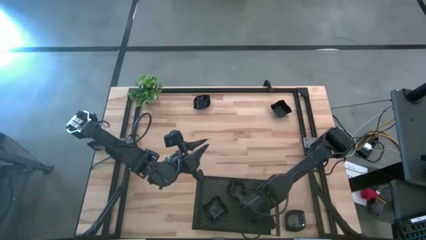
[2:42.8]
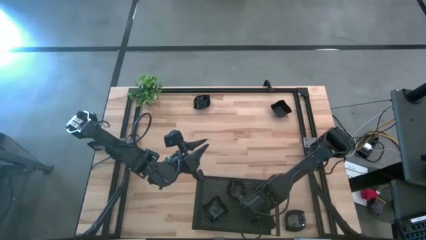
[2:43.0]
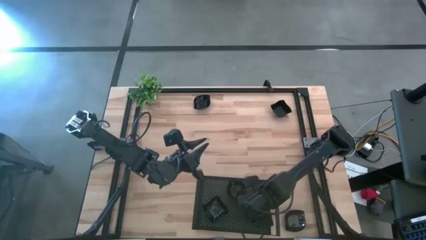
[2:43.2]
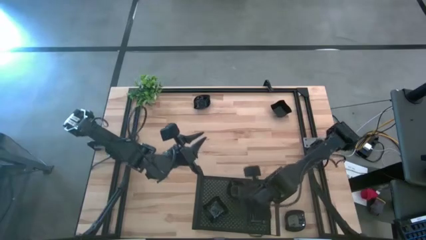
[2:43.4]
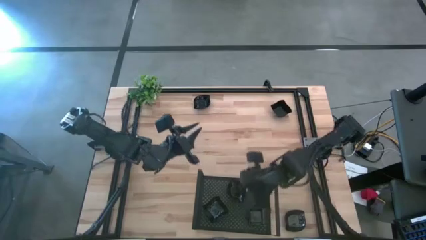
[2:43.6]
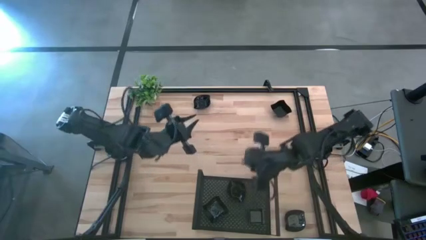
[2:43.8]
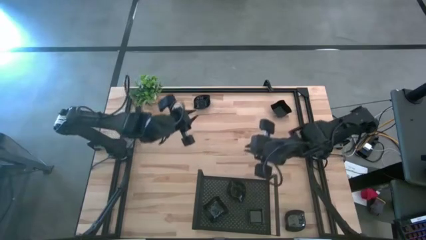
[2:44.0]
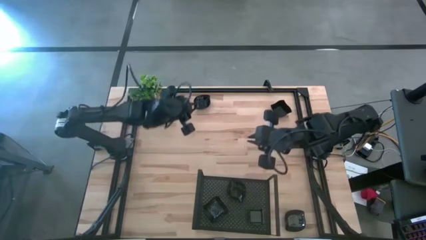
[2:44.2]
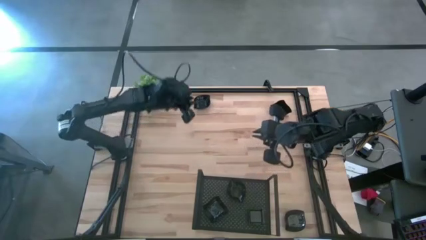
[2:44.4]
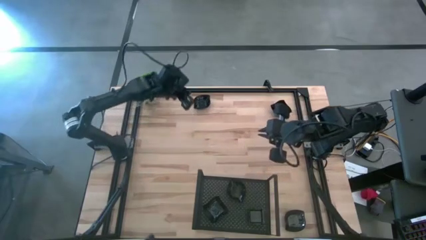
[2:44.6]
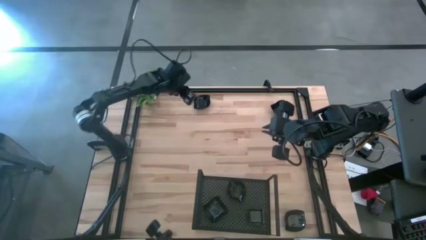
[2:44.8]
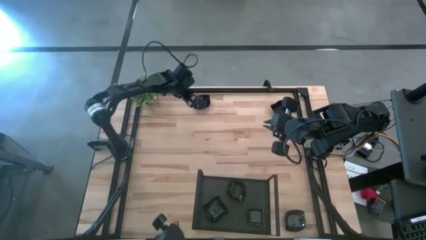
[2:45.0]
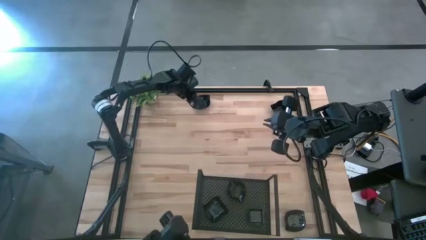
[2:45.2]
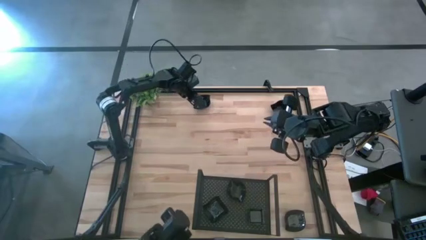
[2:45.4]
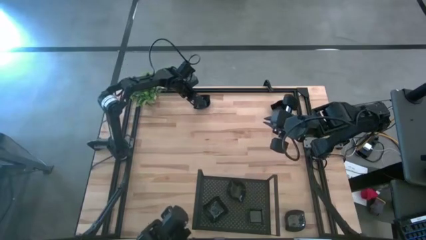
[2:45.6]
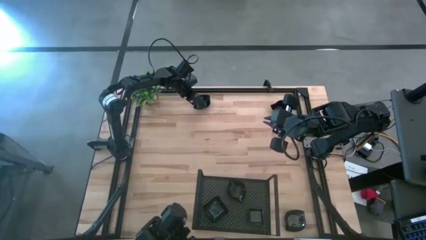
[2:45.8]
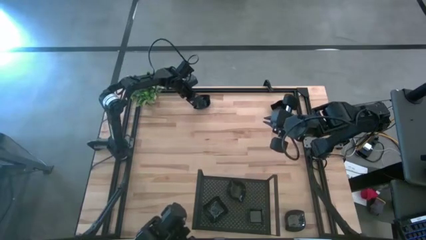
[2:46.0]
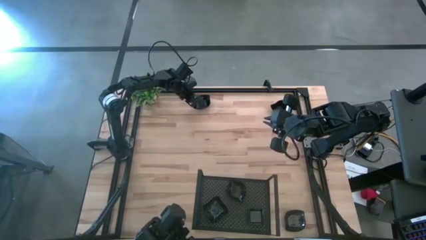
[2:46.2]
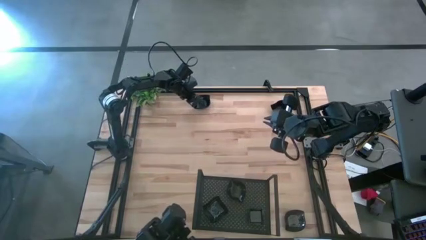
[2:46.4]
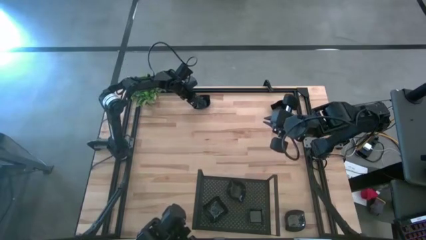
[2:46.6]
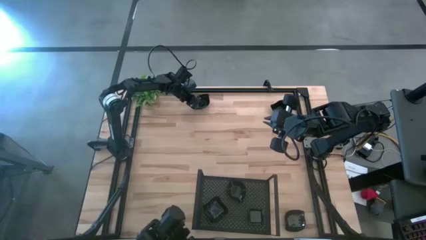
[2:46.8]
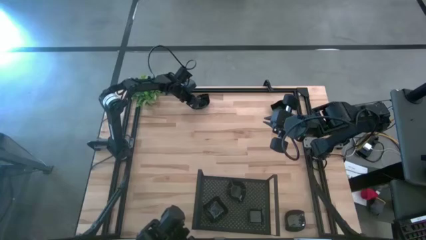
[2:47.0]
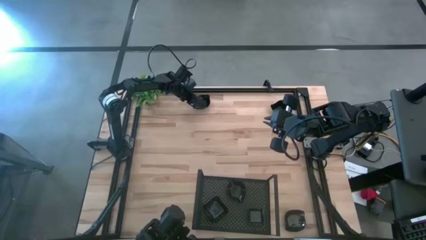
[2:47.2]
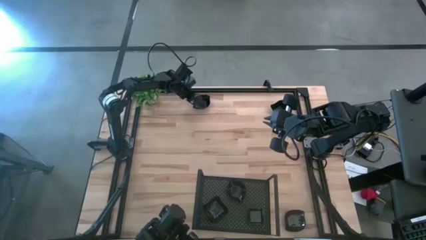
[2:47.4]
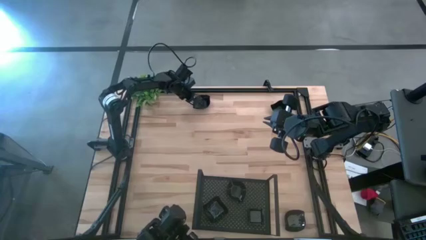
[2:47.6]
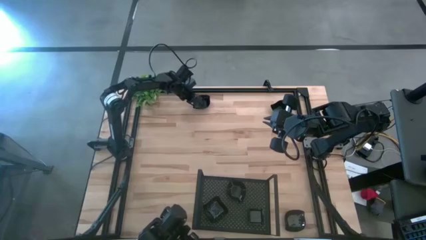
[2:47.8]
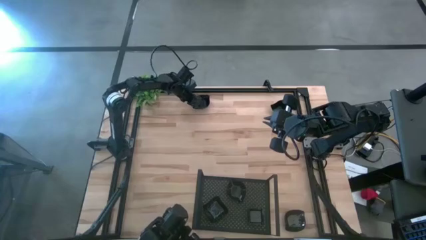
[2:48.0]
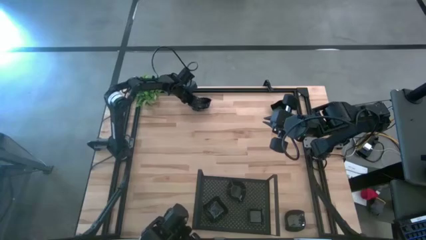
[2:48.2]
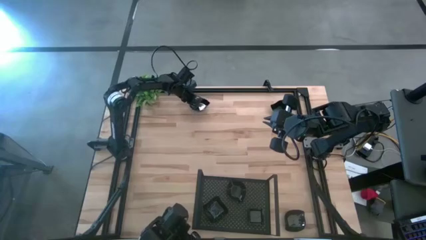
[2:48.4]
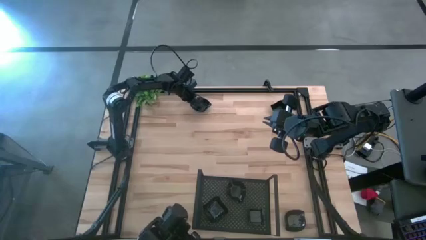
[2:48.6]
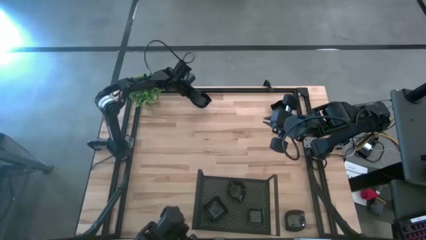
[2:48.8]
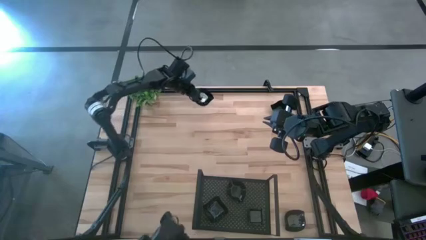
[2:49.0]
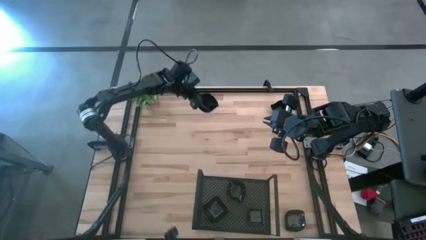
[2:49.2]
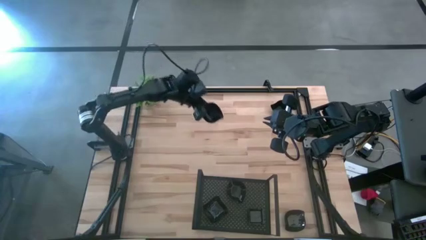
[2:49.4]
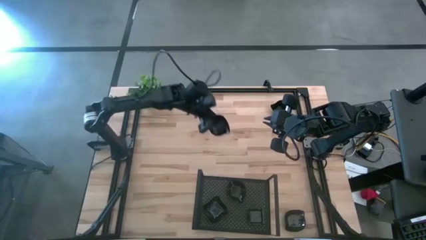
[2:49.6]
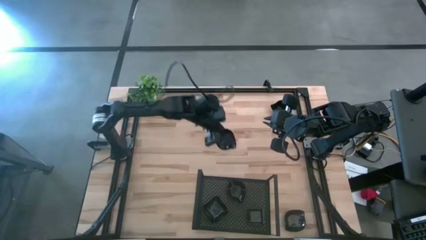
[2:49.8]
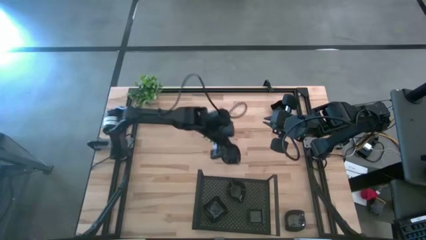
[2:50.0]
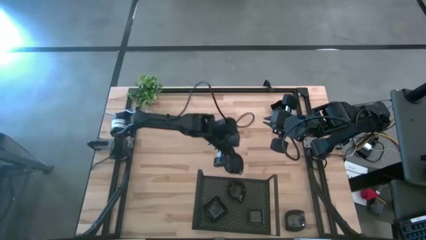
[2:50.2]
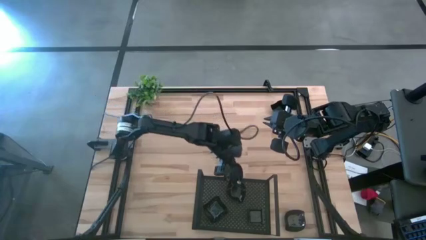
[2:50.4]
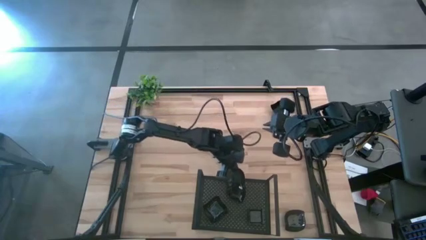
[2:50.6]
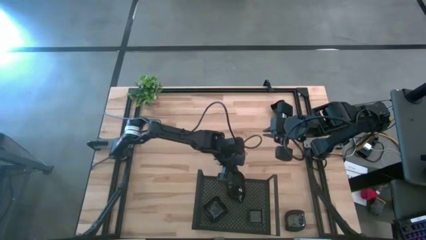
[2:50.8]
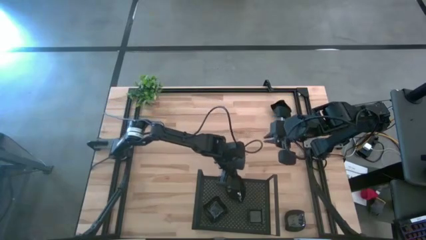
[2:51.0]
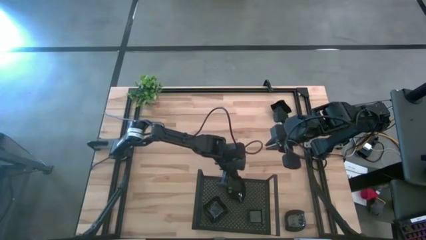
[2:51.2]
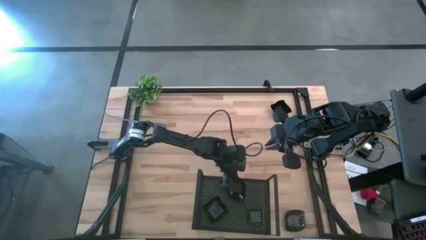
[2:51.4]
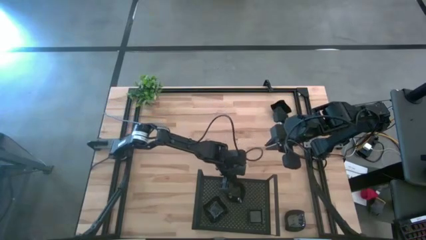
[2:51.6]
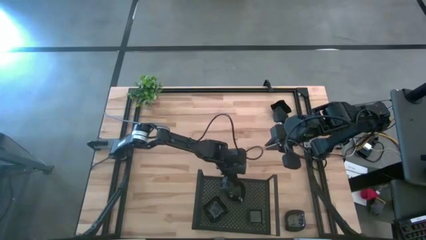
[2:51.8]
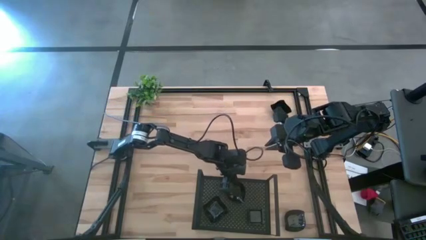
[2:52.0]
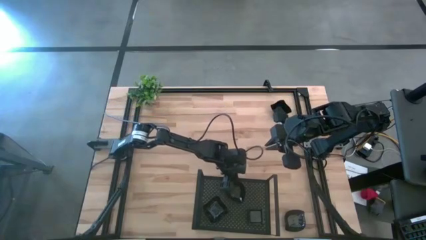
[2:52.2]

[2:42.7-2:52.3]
Task: Pick & Place Mini shaped plates
Stack the leaf shaped plate on top of the other leaf shaped plates on the shelf

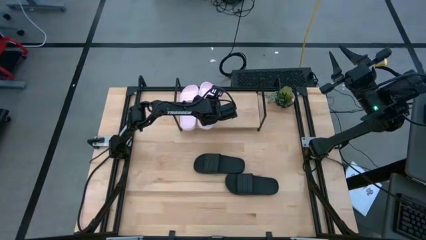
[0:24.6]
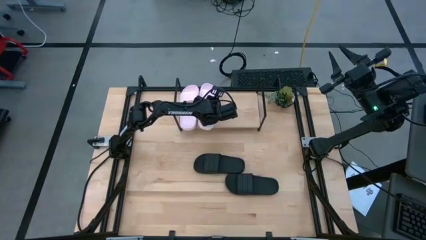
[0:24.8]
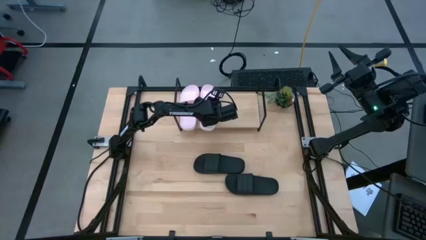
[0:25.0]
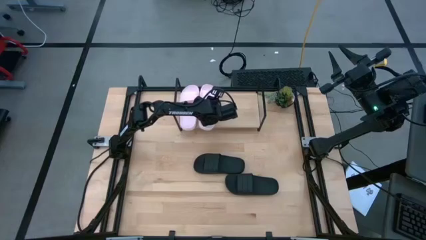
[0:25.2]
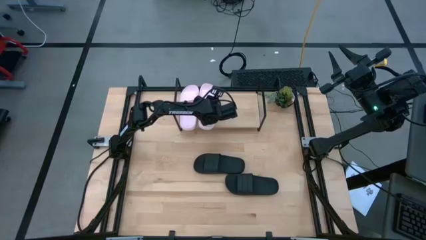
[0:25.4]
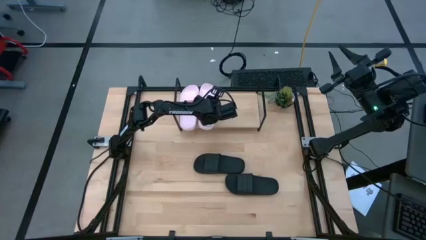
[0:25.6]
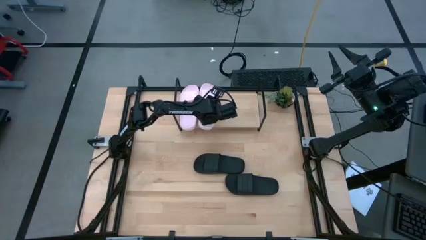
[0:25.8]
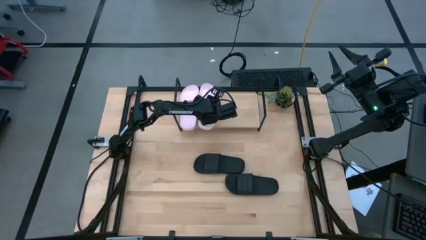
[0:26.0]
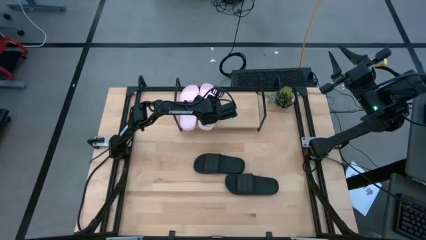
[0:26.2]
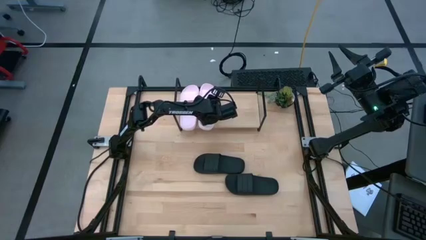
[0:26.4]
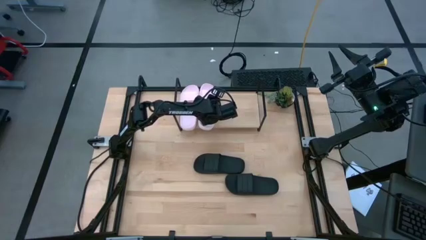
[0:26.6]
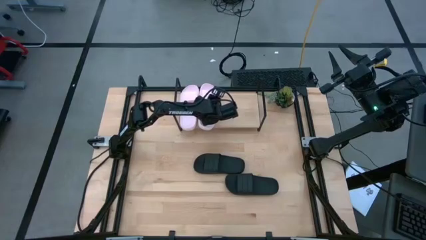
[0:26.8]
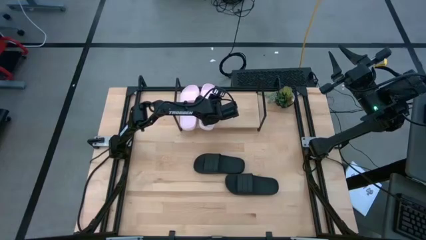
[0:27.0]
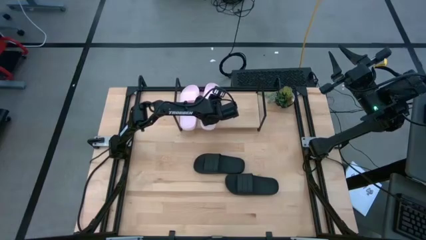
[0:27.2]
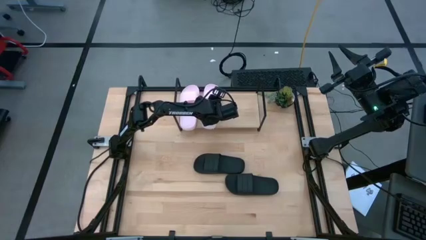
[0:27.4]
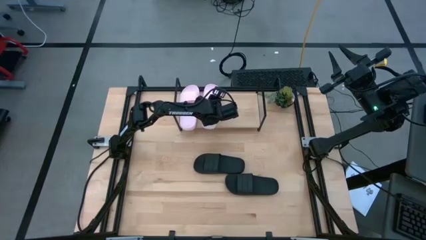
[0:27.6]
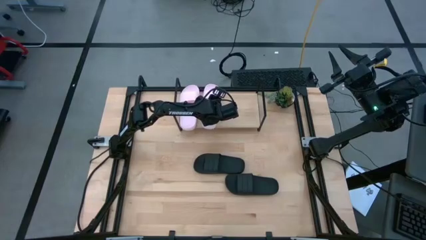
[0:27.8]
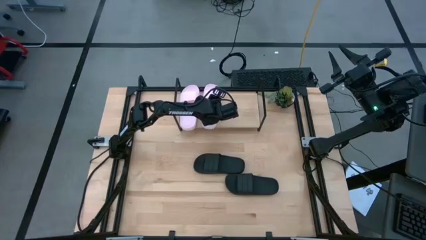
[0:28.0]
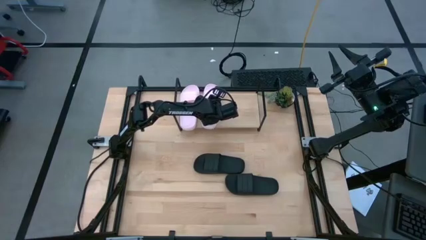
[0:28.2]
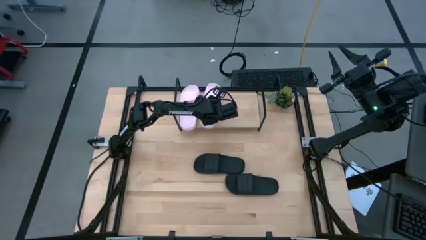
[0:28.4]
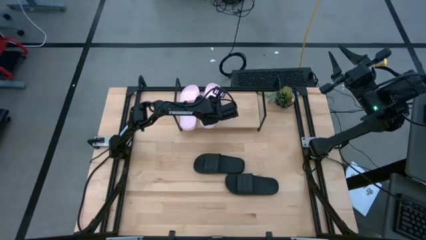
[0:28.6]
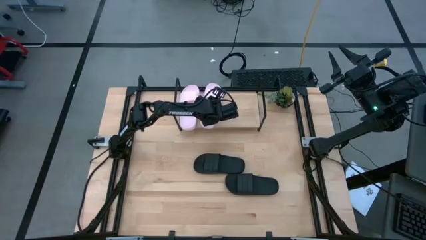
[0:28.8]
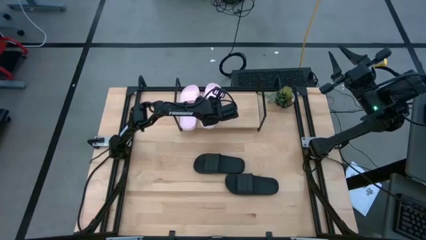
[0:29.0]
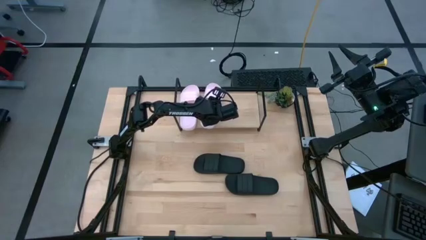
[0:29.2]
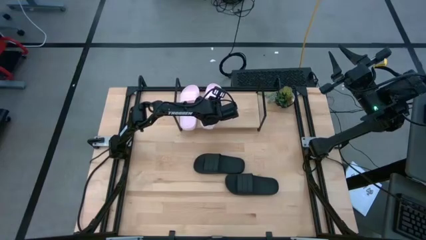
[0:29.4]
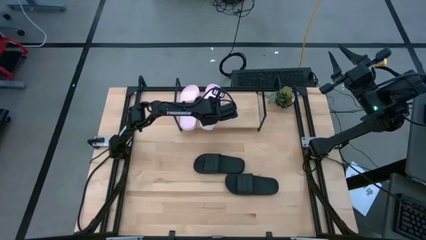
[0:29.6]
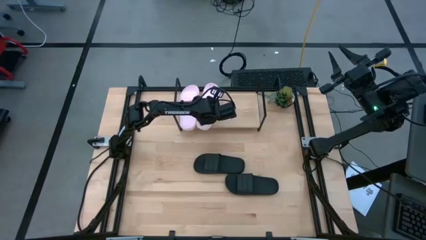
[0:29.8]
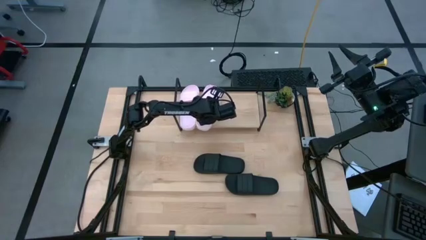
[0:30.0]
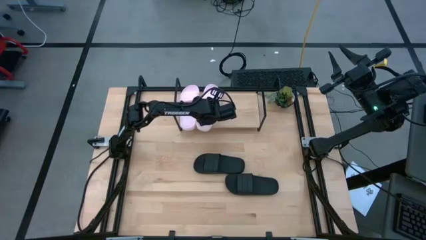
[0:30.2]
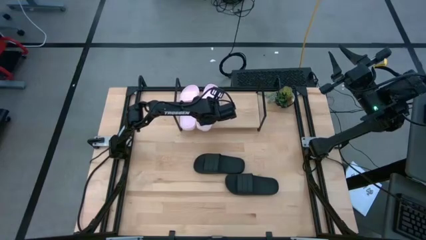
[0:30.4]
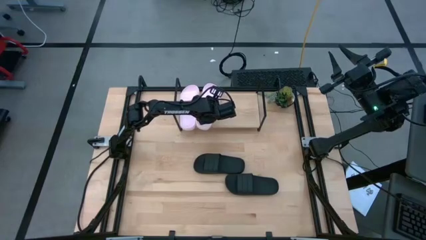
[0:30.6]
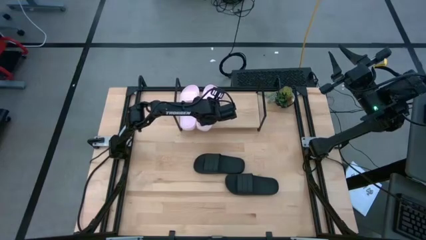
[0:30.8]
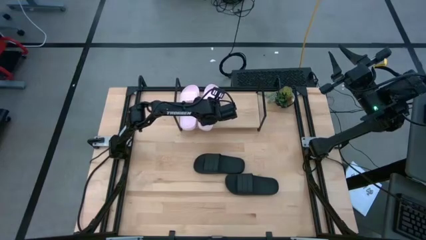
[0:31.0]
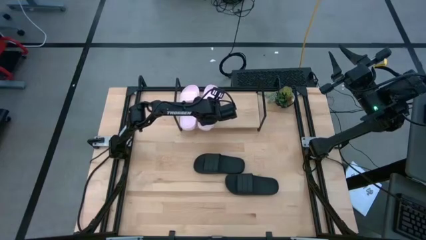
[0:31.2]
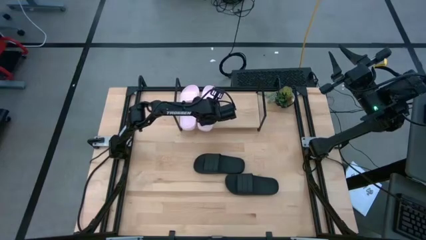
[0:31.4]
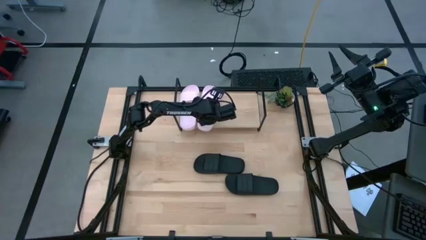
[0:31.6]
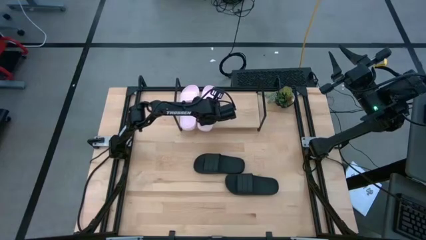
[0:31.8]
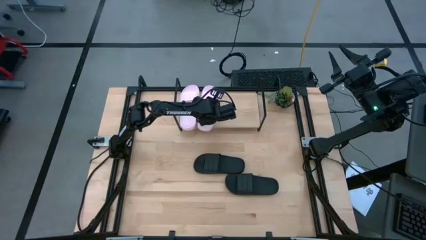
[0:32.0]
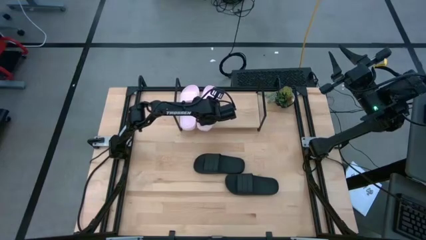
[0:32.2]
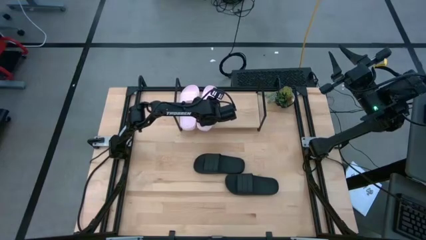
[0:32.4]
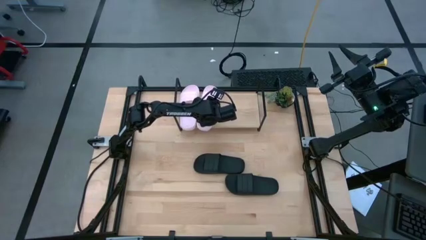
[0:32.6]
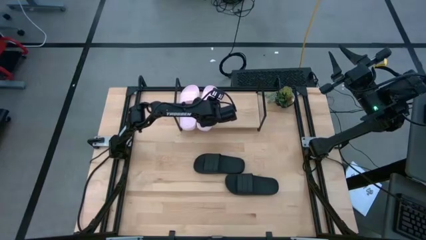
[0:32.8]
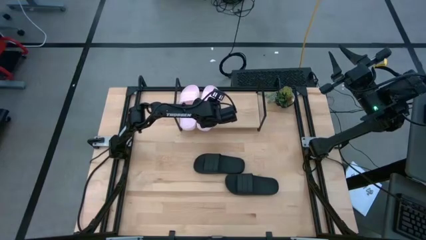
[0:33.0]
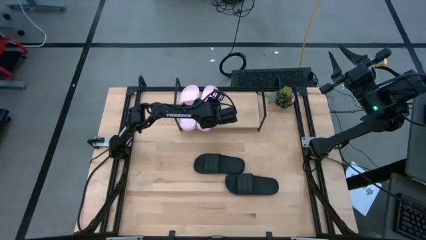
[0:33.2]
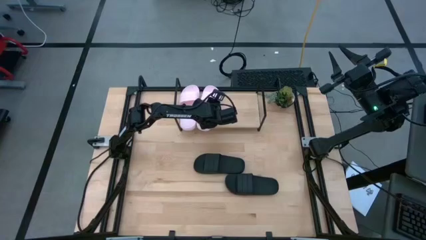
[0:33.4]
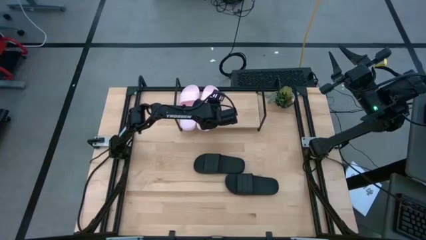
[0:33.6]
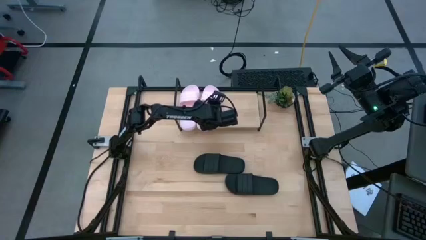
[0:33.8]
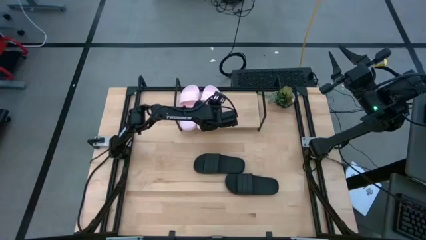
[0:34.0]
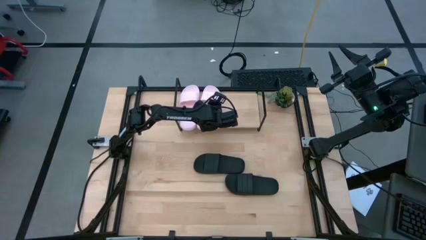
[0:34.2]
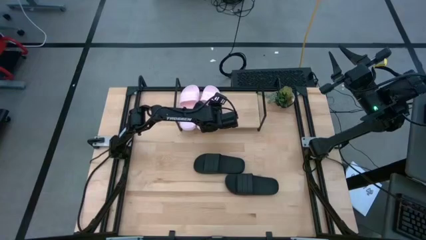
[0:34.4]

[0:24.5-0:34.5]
Task: Pick and place slides into the shelf
Put the pink slipper on the shelf
